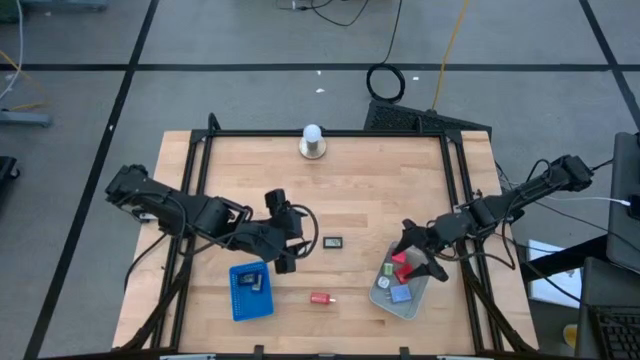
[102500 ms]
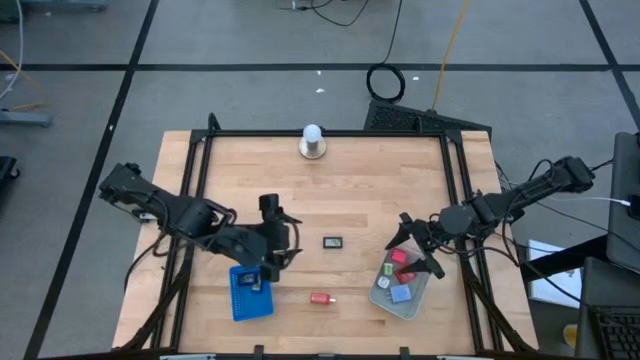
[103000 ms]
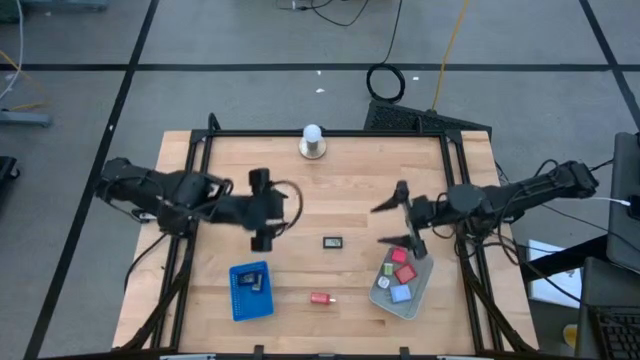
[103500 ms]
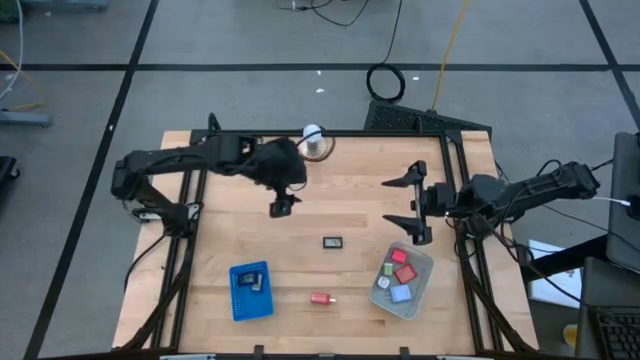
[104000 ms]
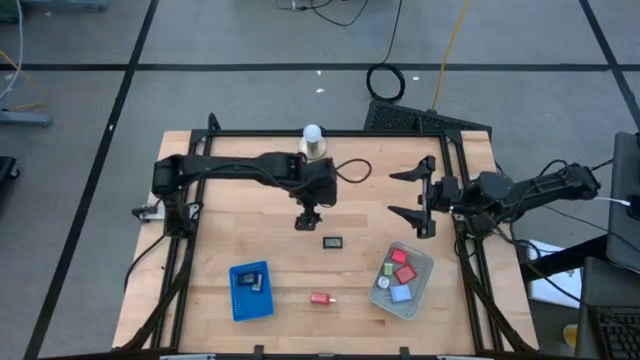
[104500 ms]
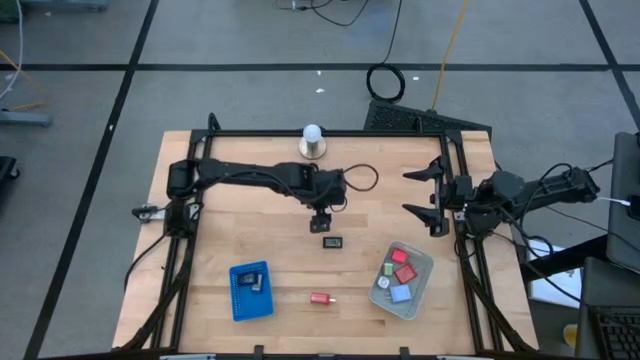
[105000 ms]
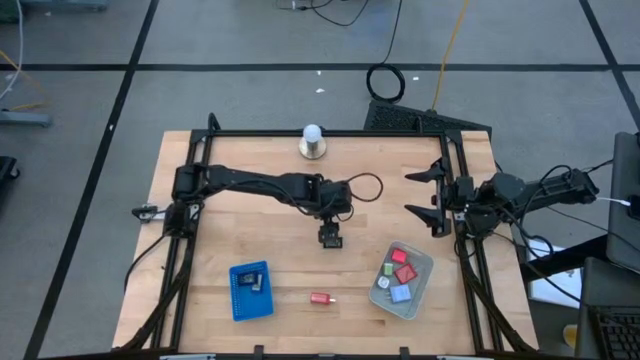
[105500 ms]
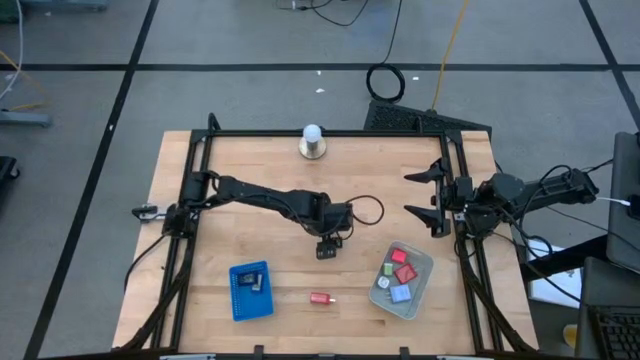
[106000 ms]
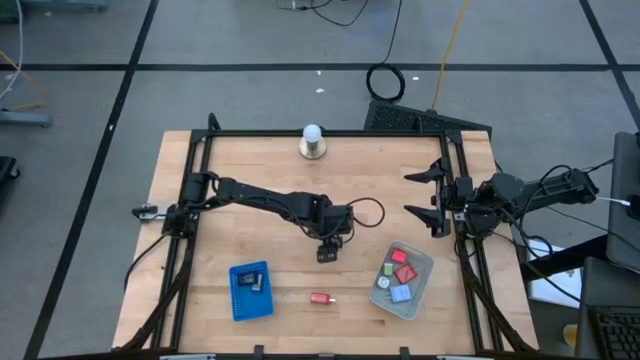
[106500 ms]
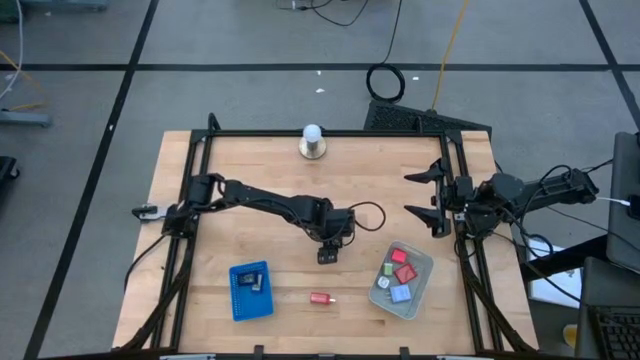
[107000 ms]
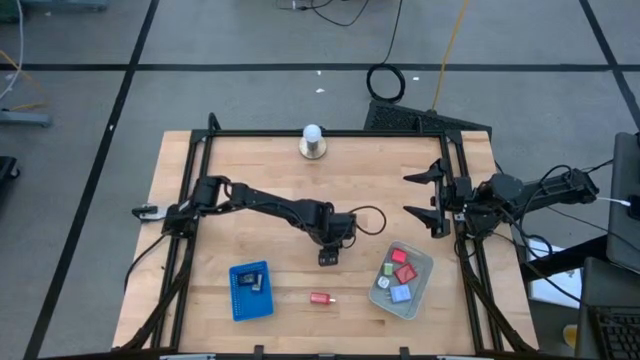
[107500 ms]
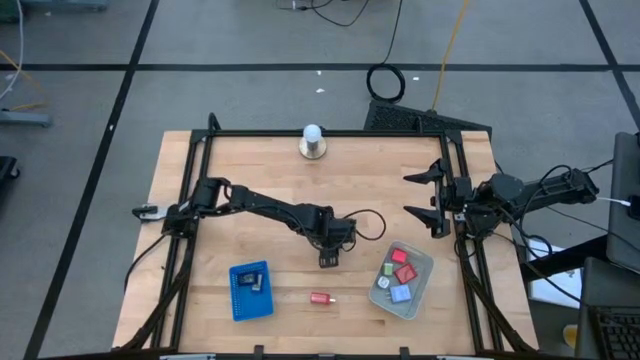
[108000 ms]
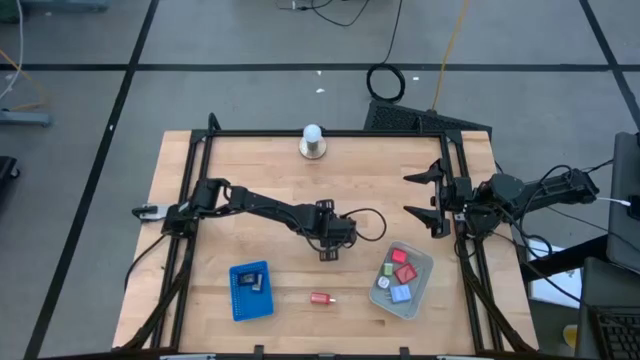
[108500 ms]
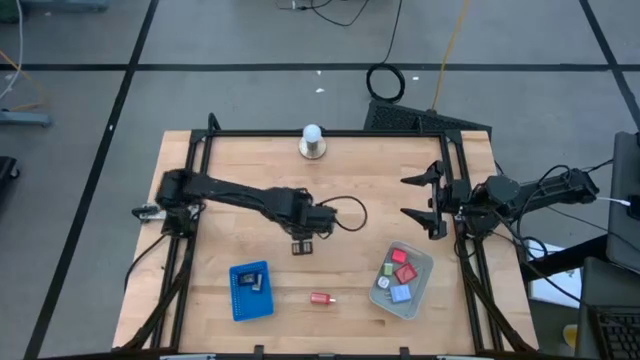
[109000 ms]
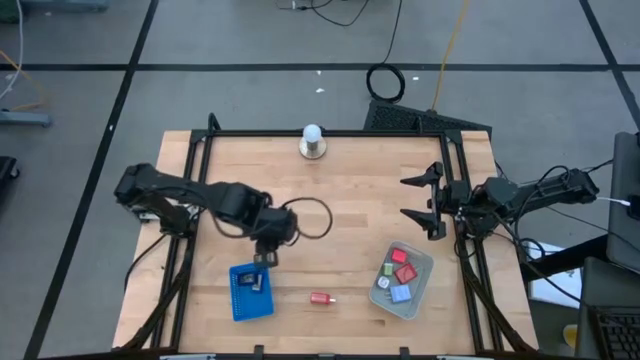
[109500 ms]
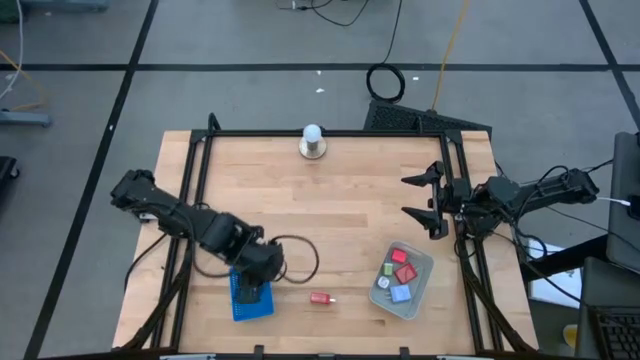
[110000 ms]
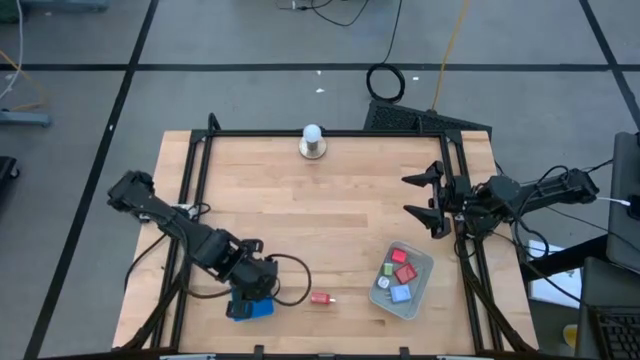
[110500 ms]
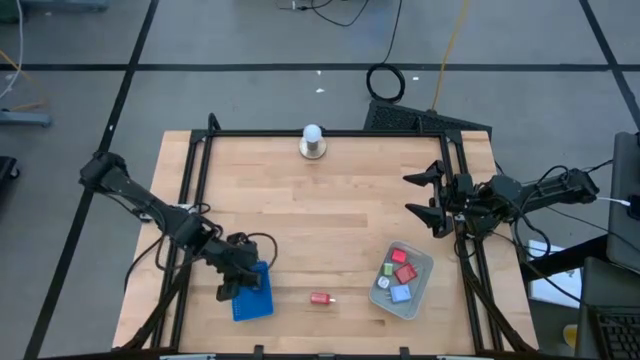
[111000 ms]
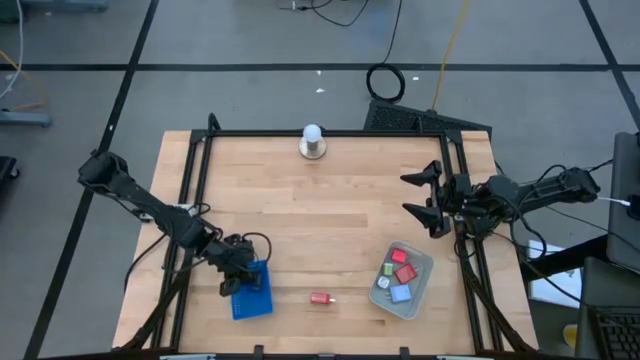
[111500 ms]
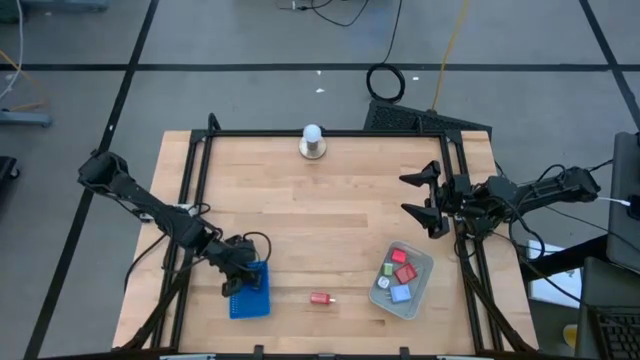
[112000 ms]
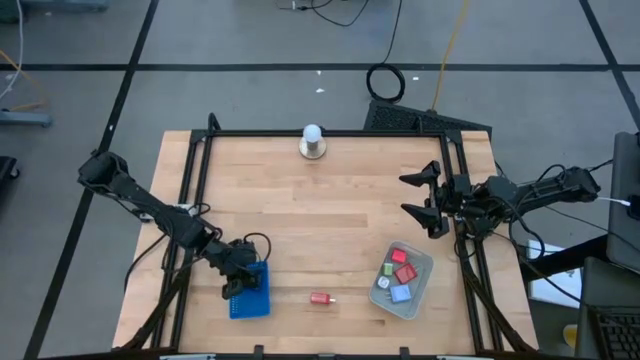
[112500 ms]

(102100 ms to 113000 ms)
Task: Pick & Place Office items
Put the black digital clock into the blue bin

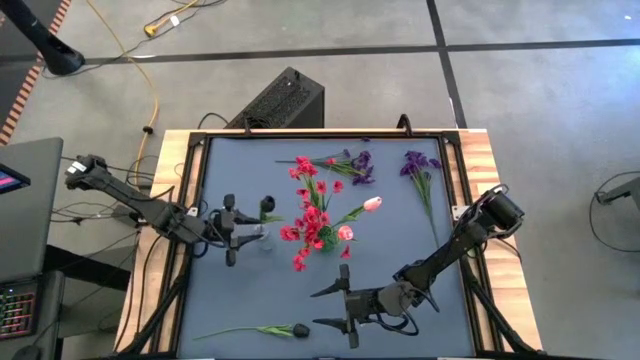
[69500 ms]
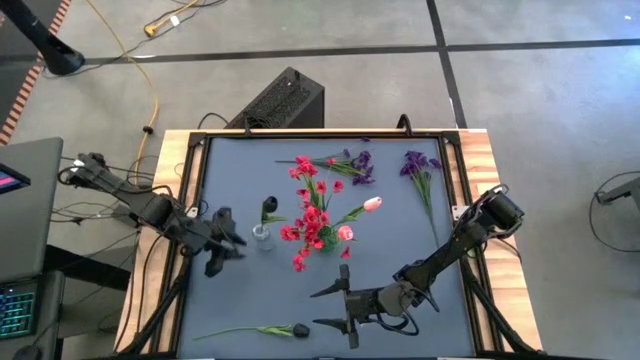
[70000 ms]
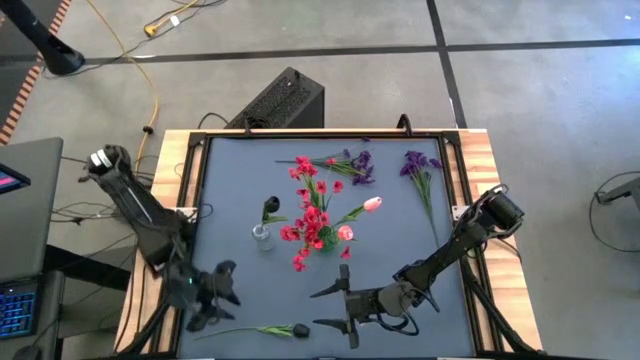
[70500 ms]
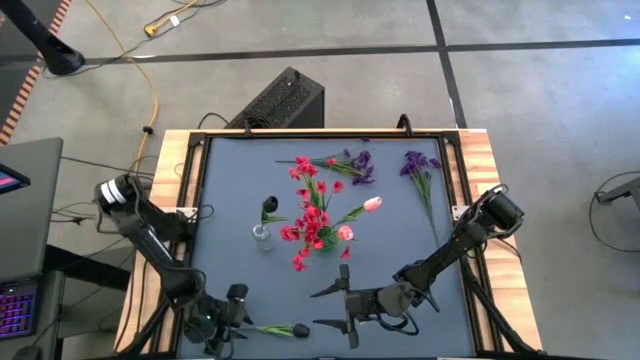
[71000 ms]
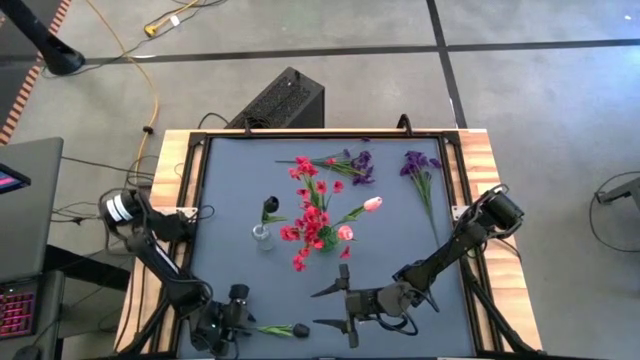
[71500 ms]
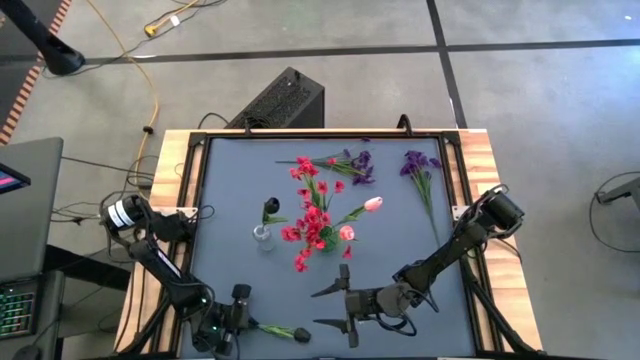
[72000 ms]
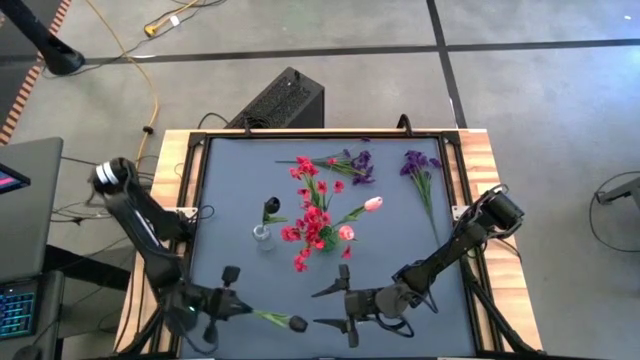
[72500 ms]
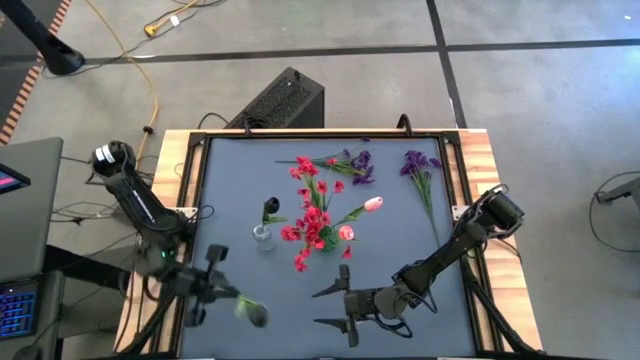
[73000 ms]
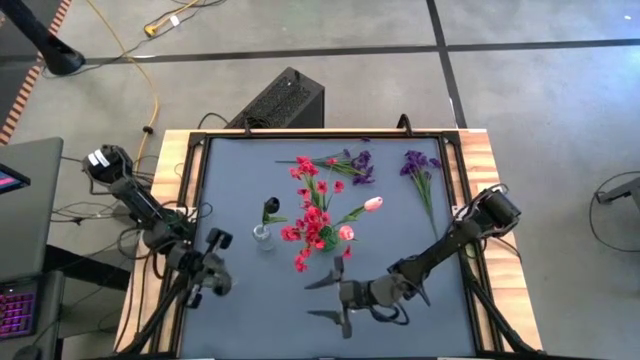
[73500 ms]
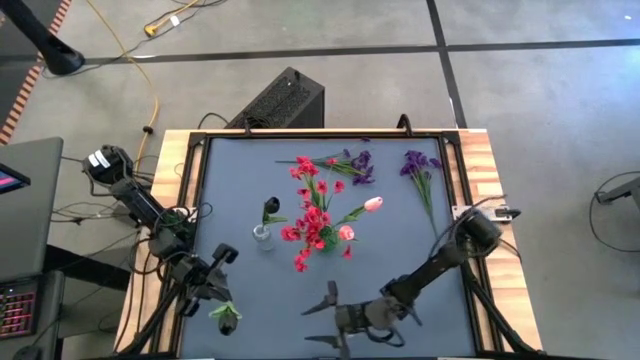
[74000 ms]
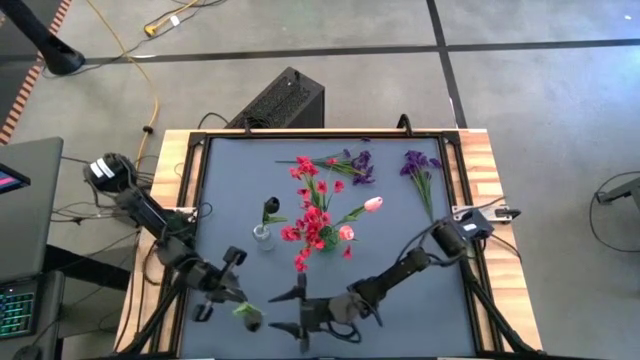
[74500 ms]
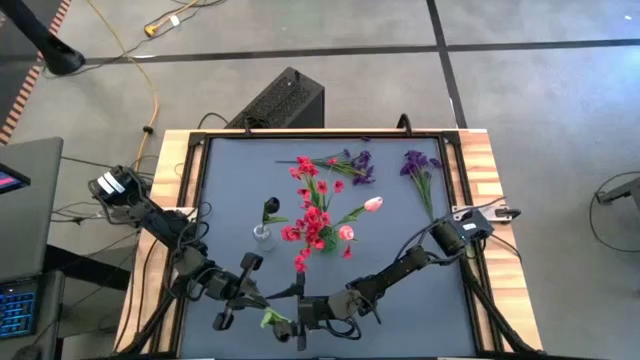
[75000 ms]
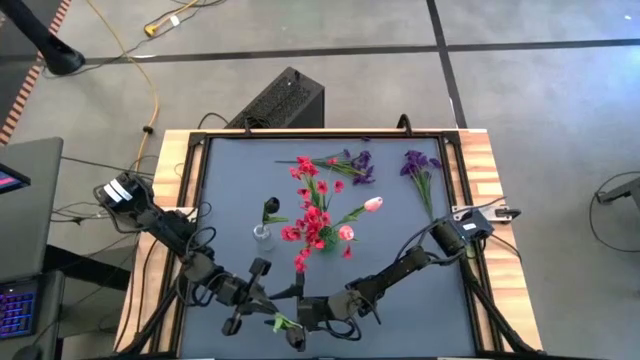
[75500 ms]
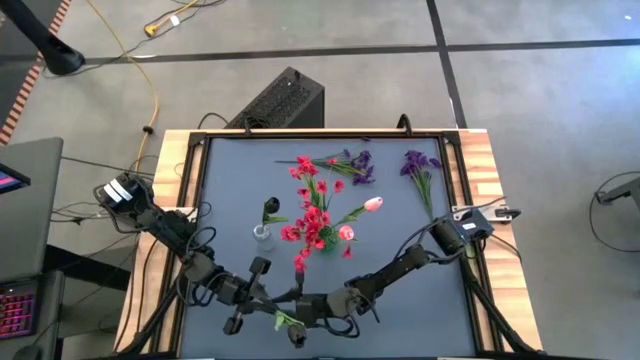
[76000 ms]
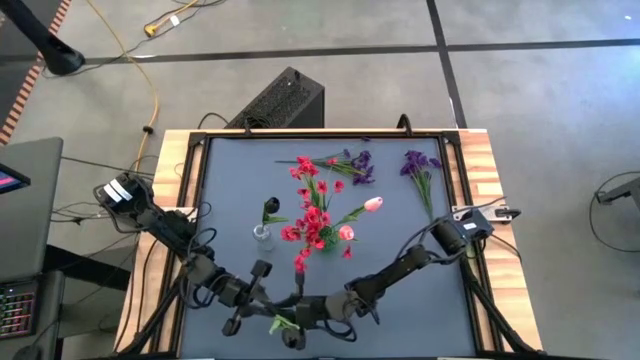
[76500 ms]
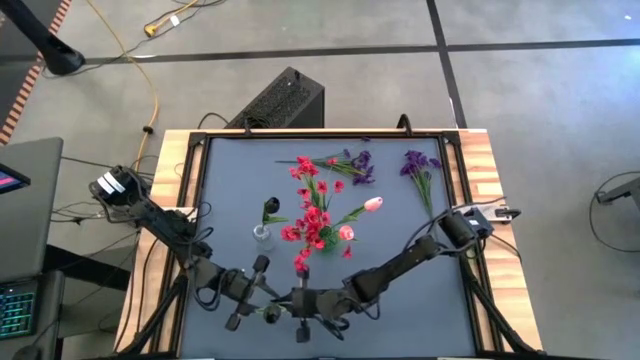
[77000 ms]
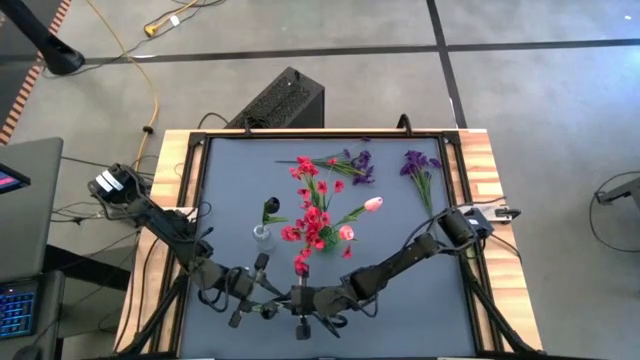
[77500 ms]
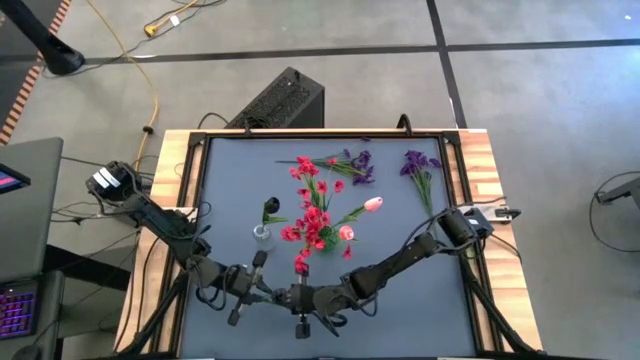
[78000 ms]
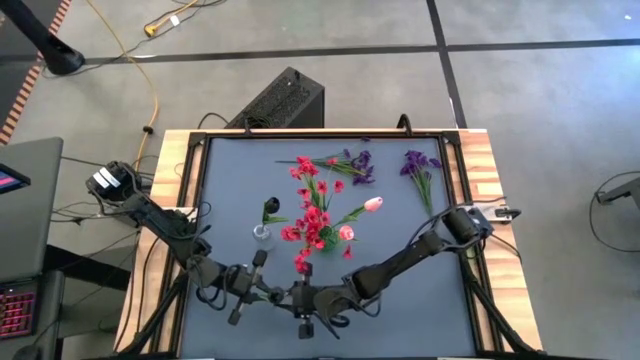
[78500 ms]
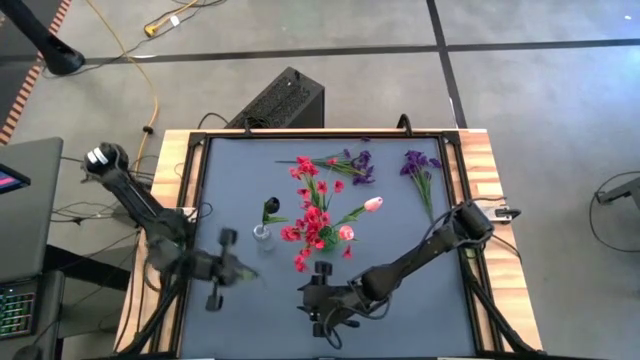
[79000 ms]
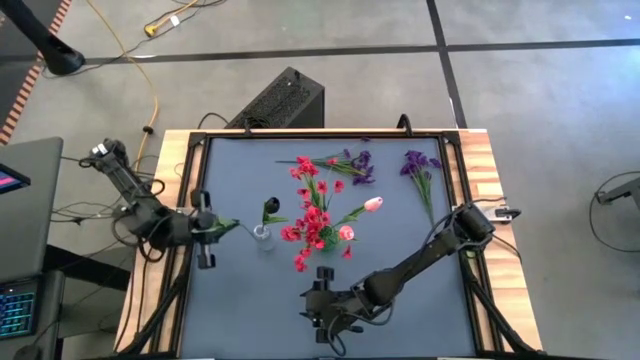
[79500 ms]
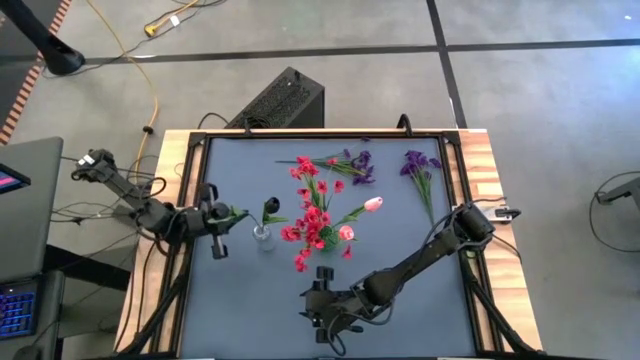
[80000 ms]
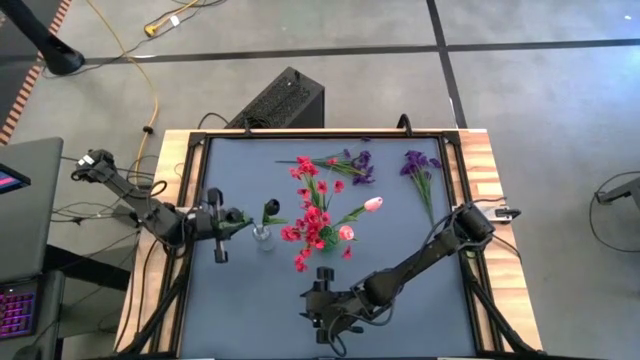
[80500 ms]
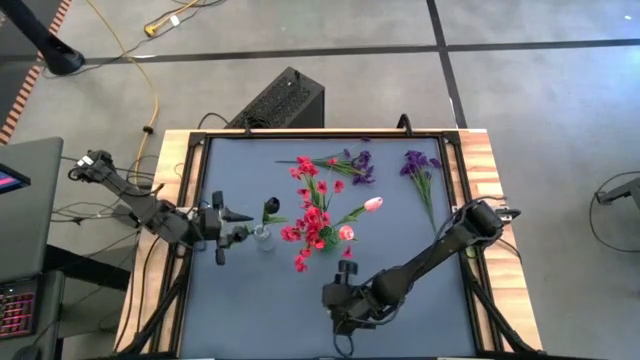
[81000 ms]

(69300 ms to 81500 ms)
Task: Sort flowers into vase by color
Put the black flower into the transparent vase
